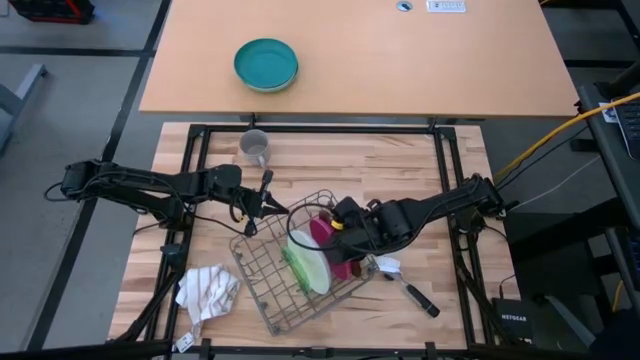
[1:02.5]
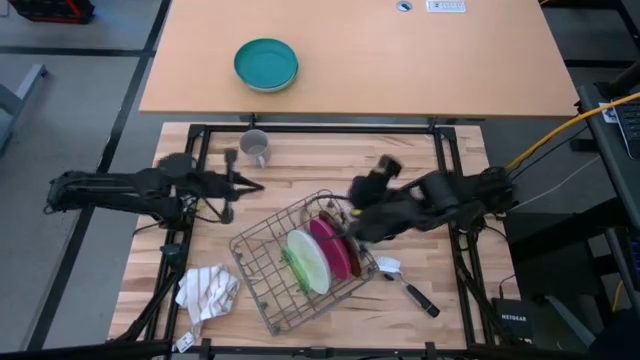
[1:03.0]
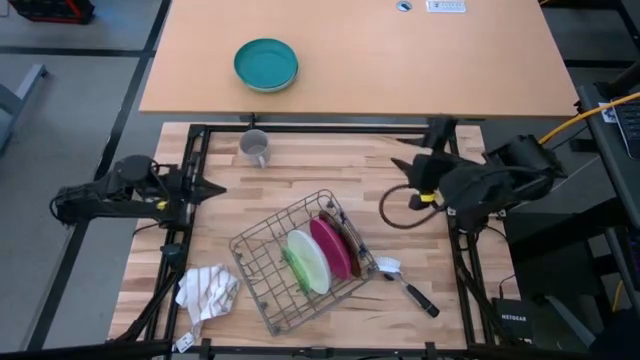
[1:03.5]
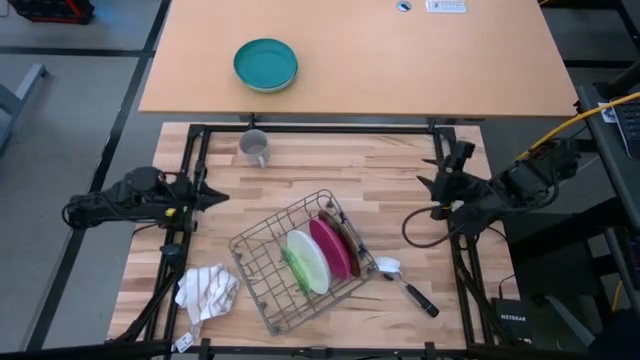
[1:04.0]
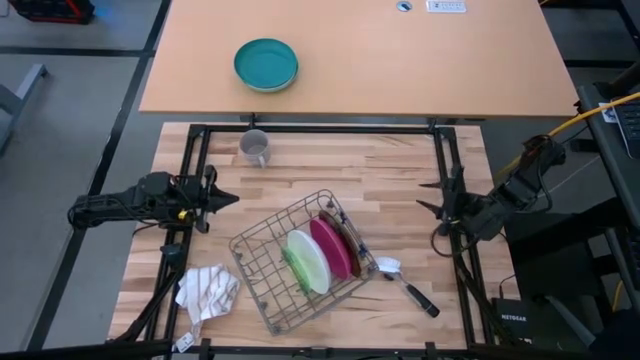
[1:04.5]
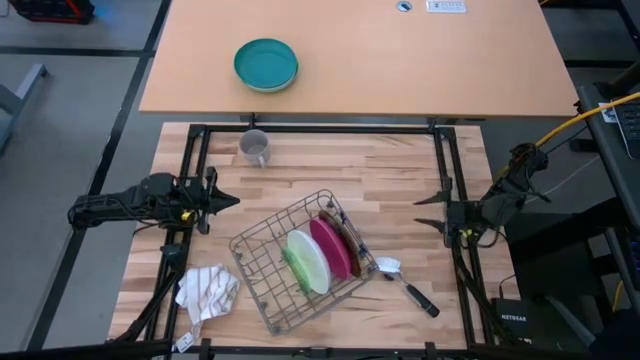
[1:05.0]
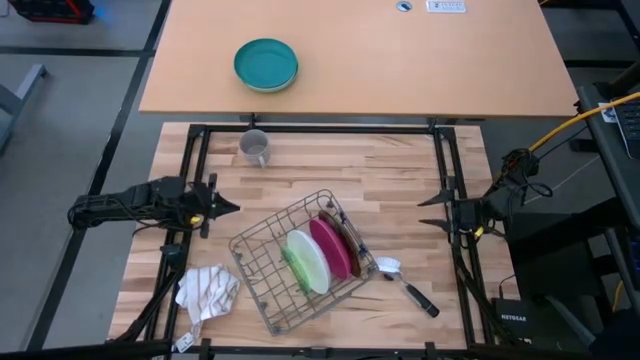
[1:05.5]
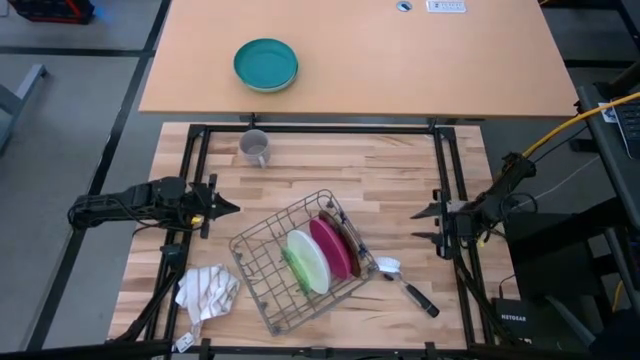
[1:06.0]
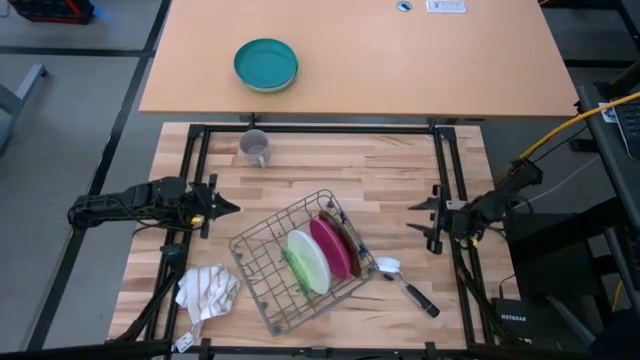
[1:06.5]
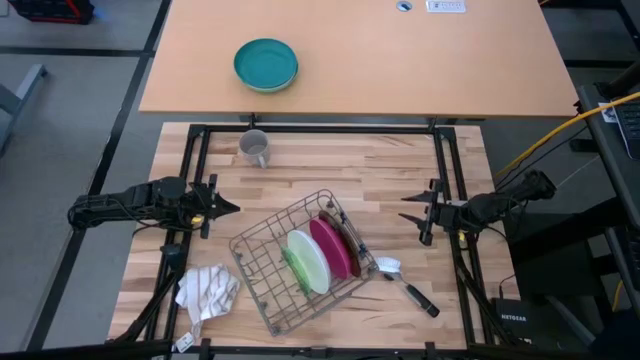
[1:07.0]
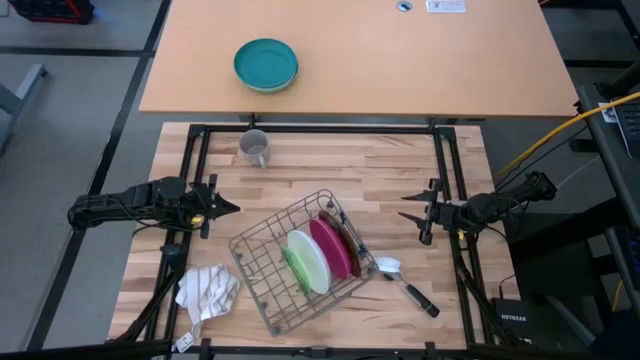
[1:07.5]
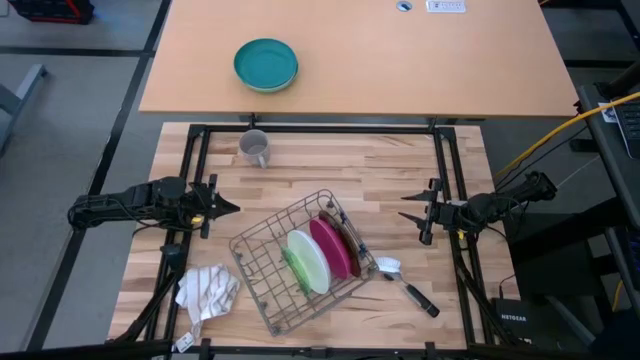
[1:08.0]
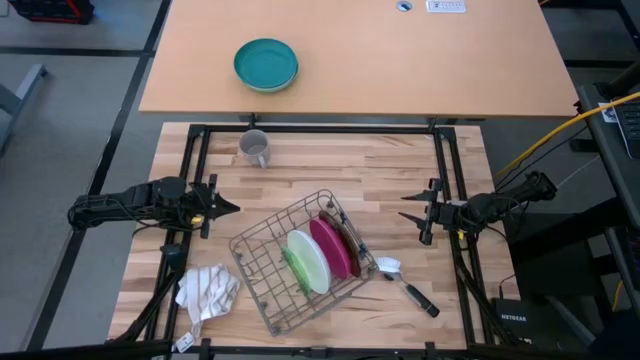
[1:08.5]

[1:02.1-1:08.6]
Task: Sort dishes
Return to Home Position

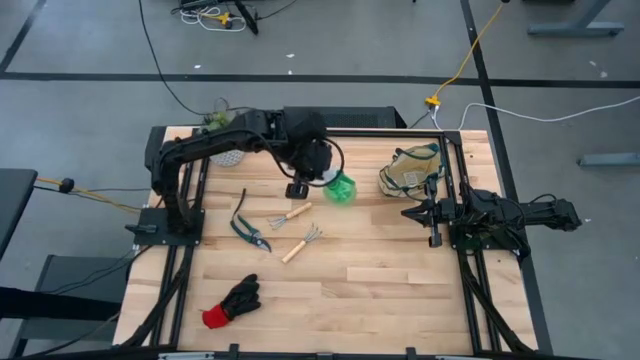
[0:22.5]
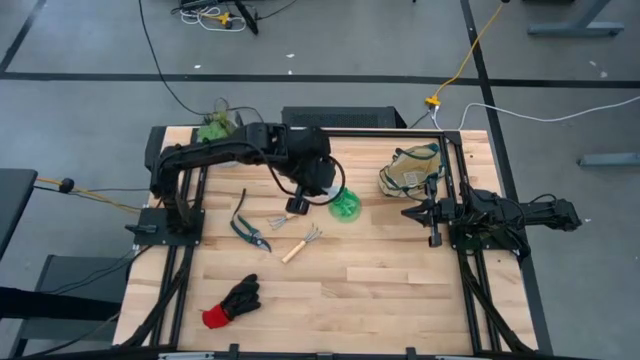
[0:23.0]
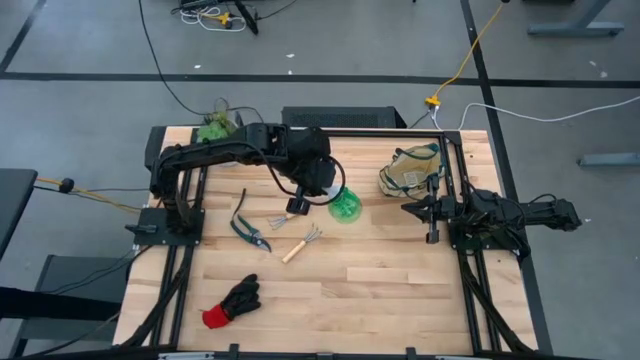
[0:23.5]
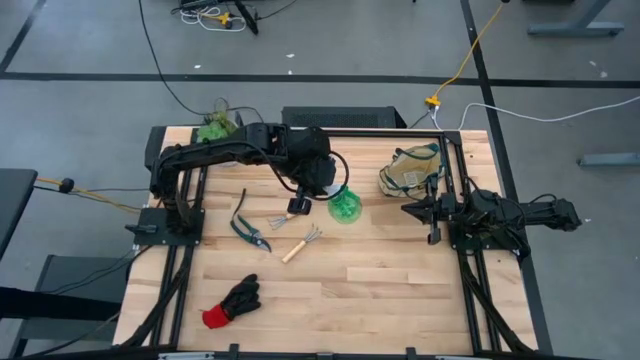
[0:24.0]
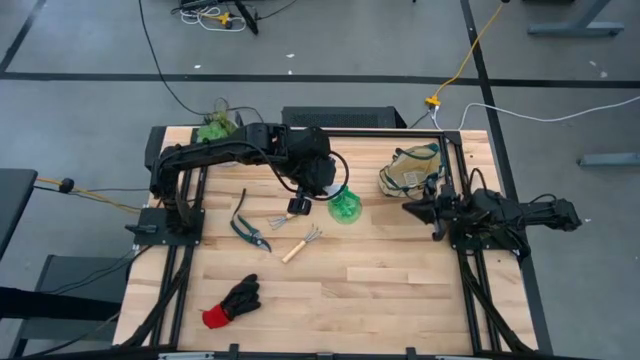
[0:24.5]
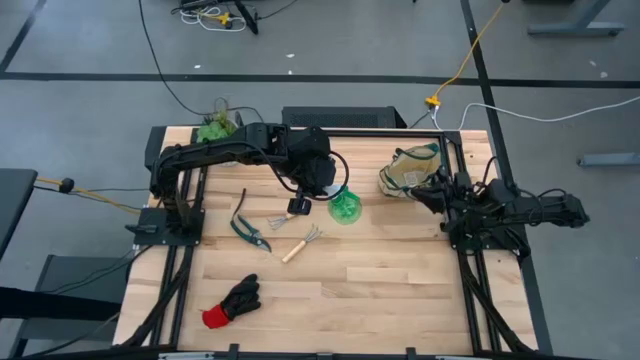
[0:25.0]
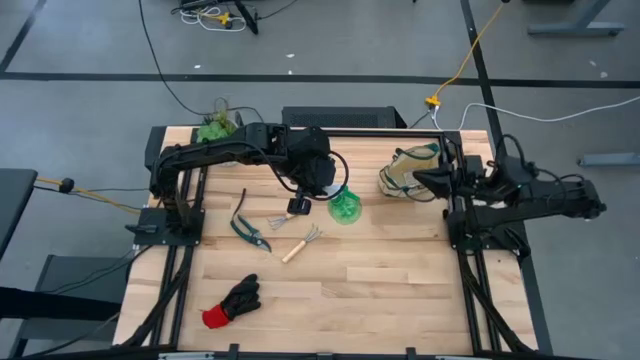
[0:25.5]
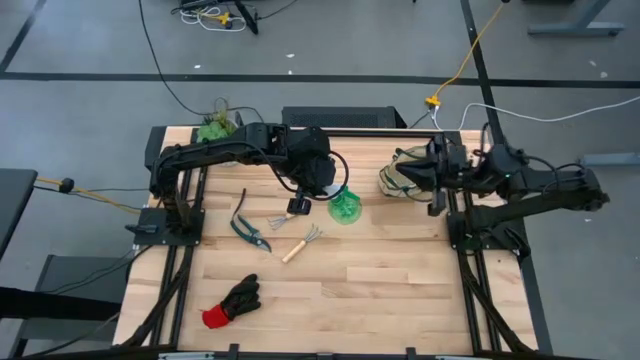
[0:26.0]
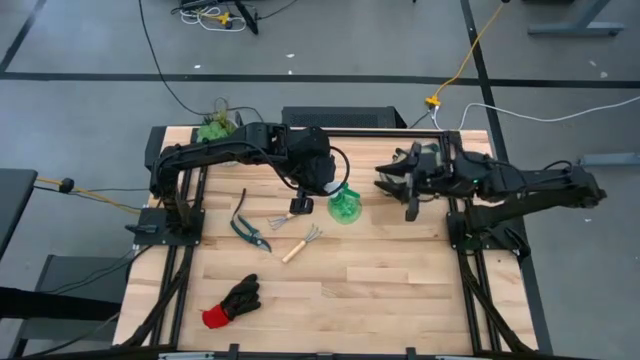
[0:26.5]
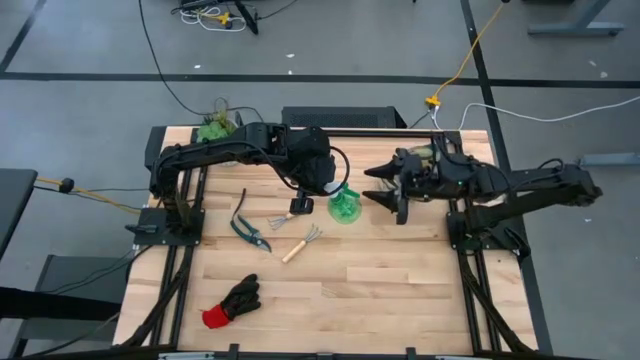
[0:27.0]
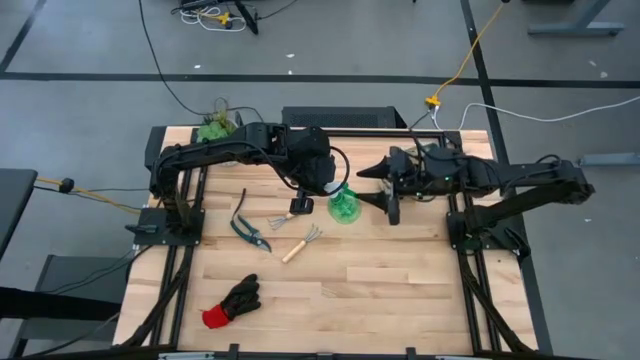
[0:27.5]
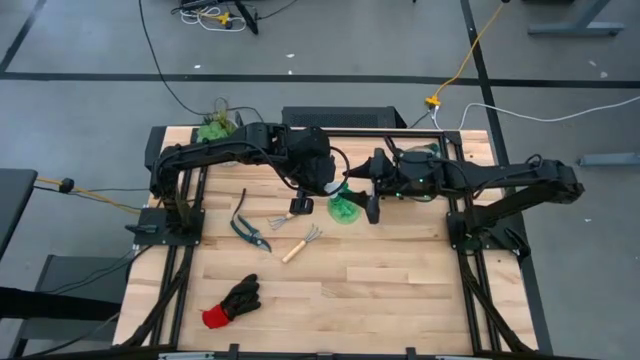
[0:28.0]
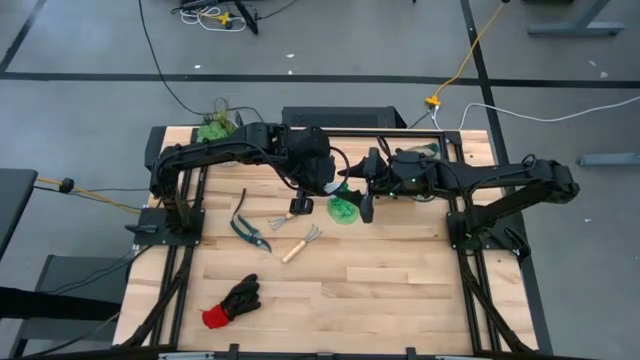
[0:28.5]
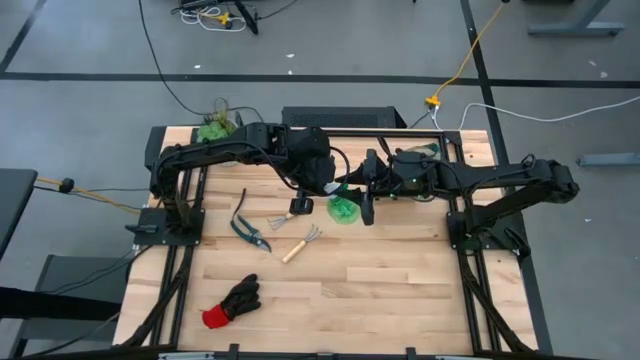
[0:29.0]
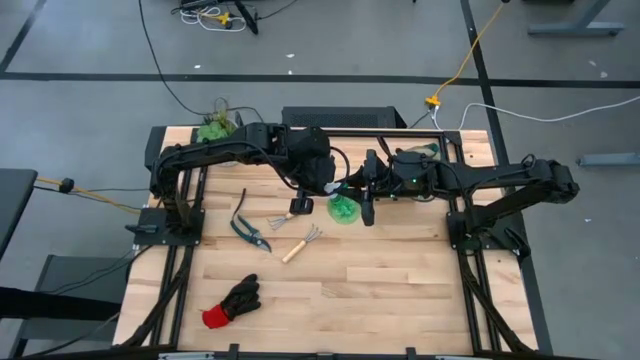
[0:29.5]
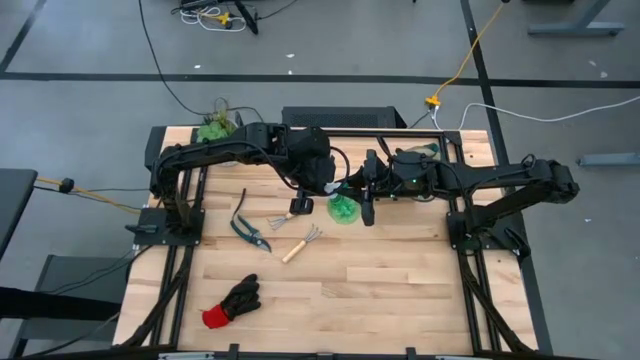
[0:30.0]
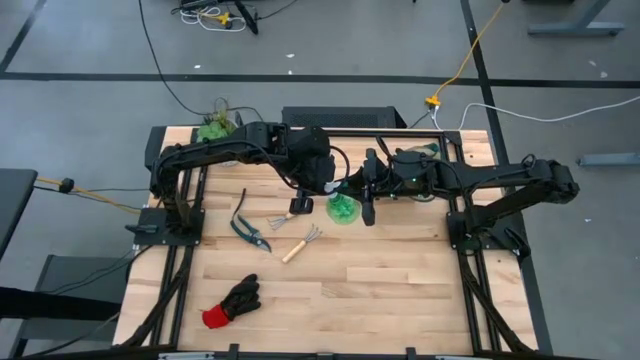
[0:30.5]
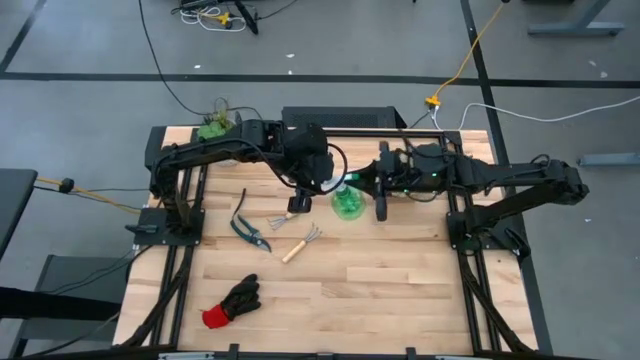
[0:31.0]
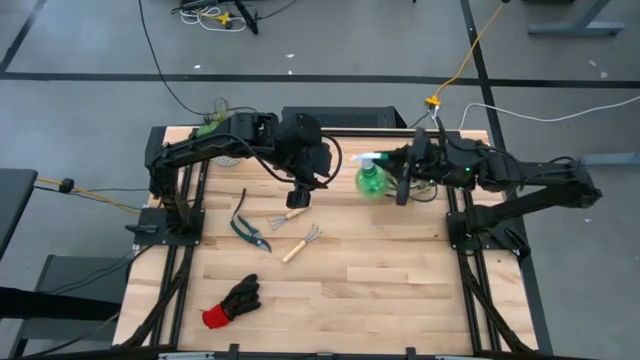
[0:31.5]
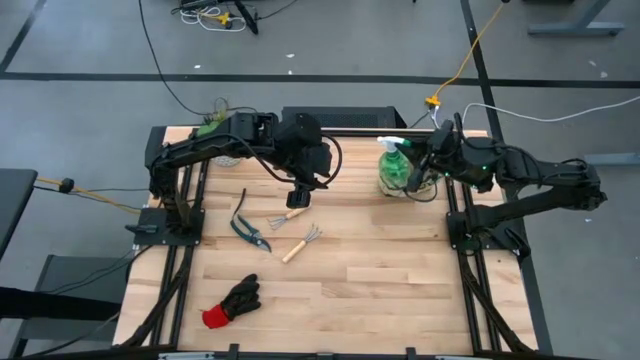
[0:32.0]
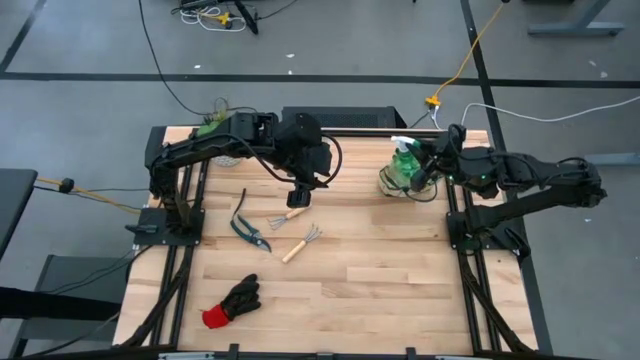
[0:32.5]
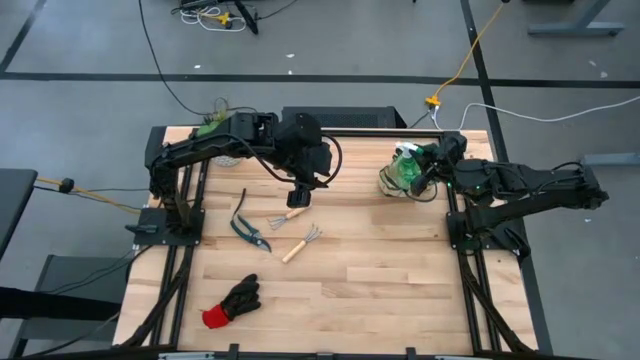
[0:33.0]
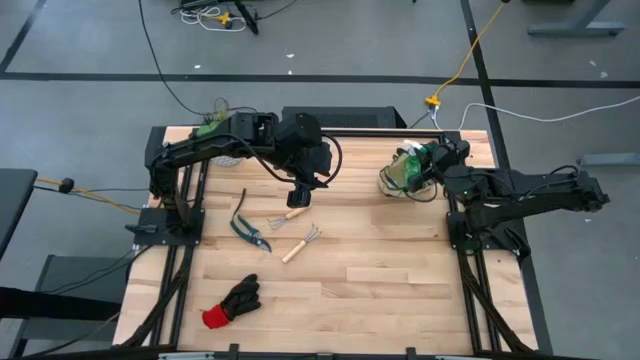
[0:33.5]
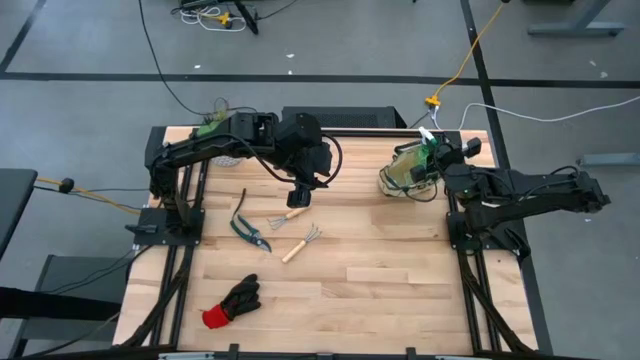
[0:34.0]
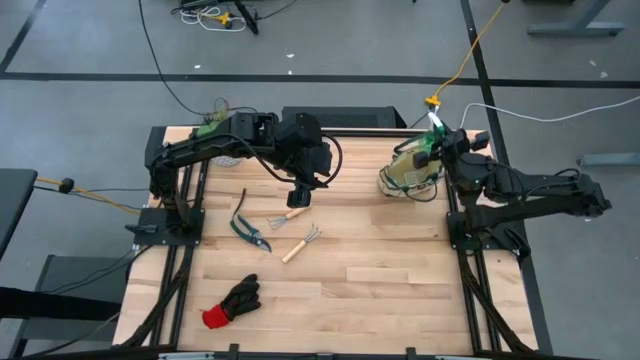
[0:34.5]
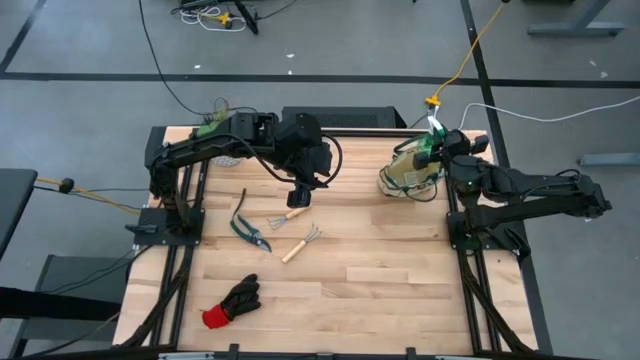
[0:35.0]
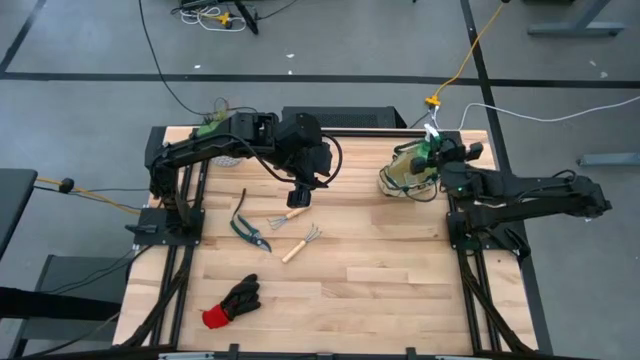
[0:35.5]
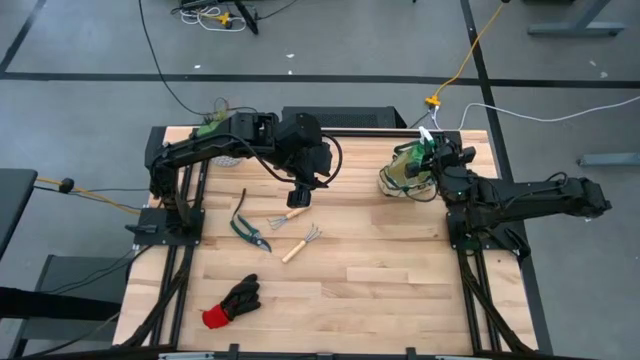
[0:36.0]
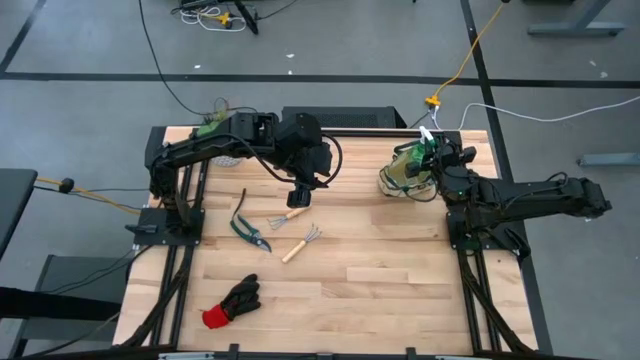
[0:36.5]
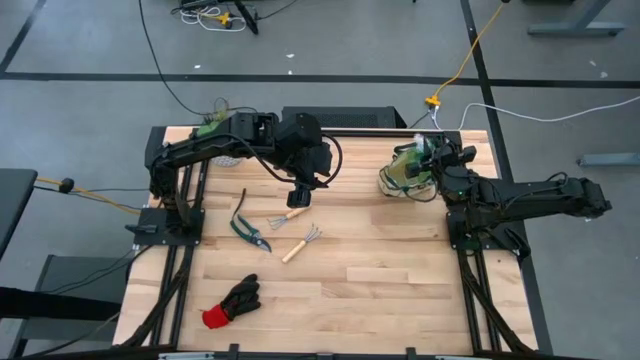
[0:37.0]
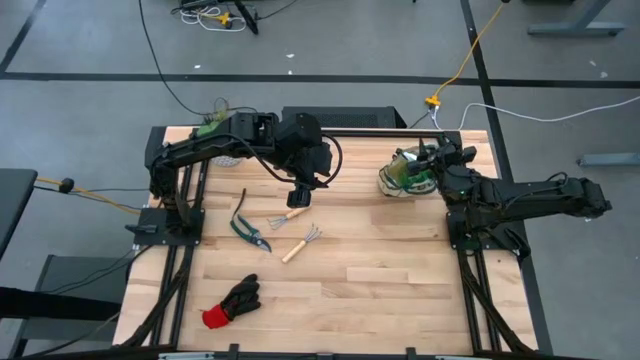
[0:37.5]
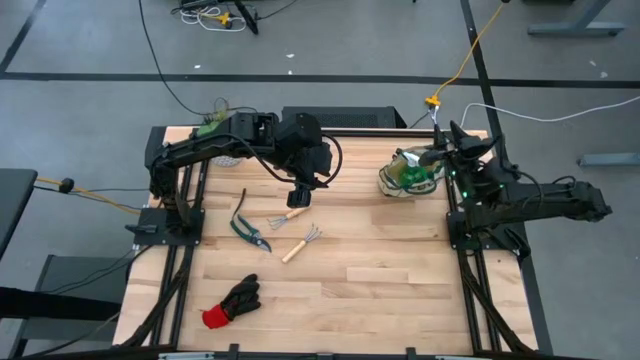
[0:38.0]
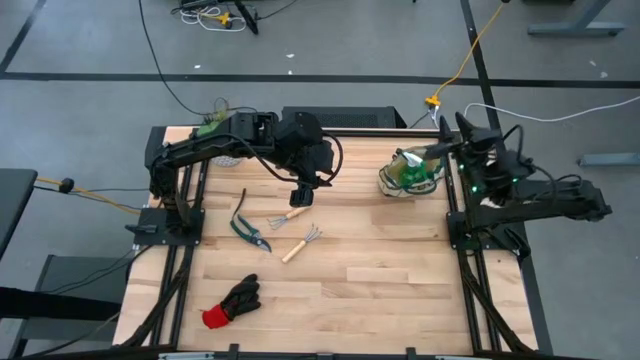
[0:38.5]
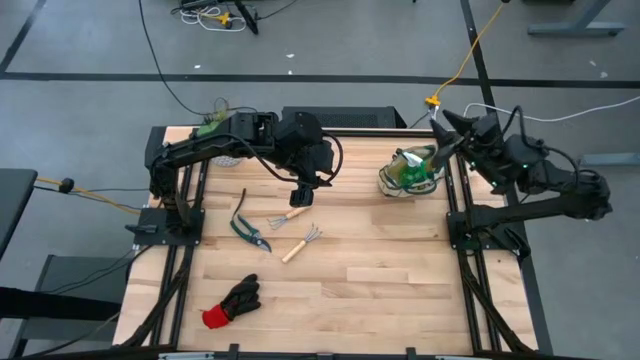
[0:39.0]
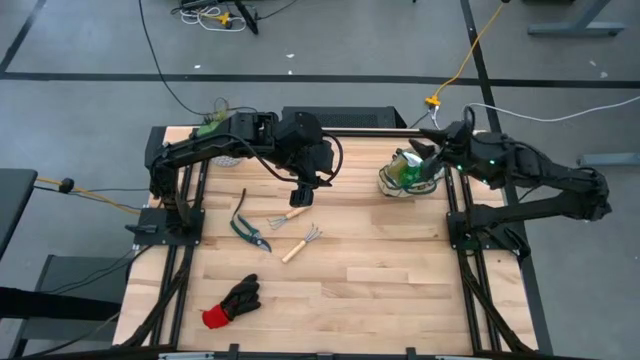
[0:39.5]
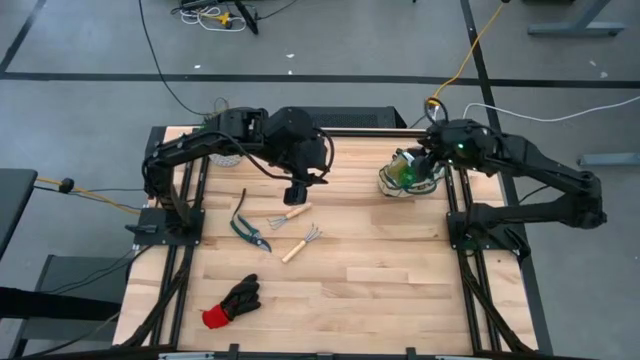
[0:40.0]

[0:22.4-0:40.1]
Task: Pick & Place Garden tools in Gardening bag
Put the green spray bottle into the brown gardening bag
